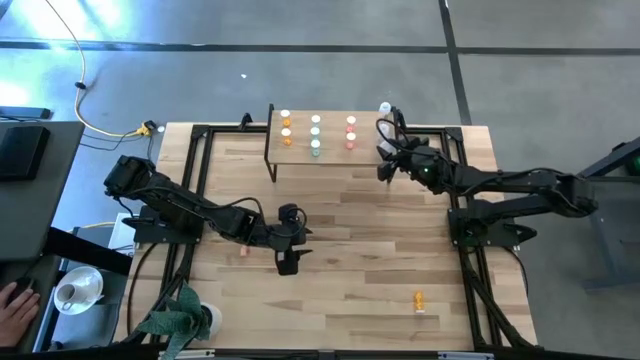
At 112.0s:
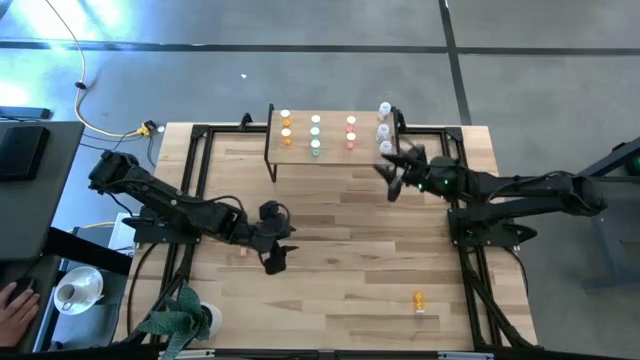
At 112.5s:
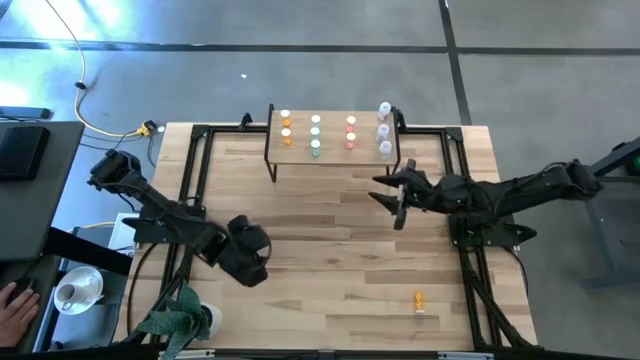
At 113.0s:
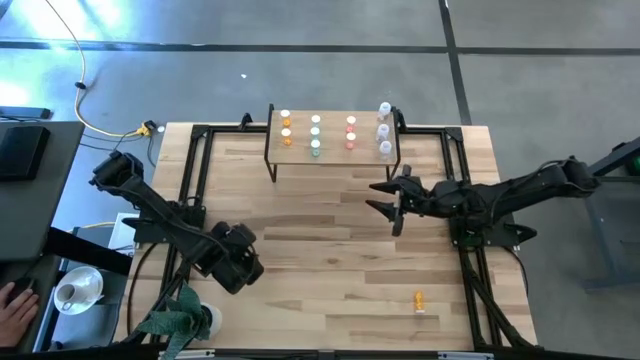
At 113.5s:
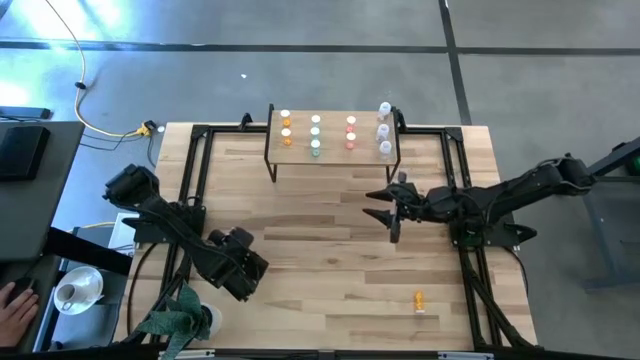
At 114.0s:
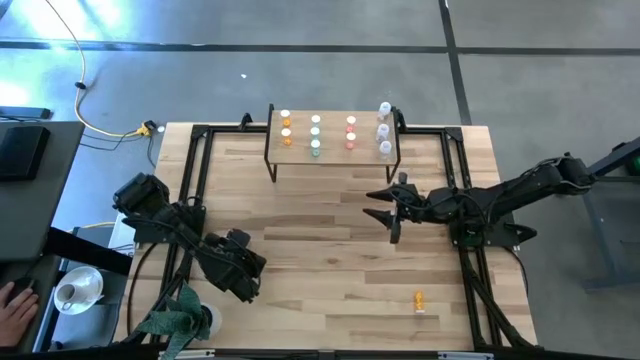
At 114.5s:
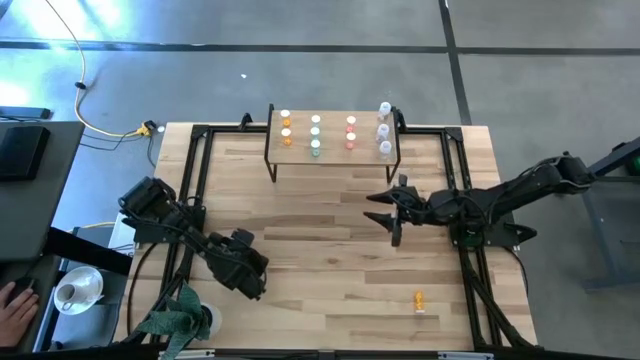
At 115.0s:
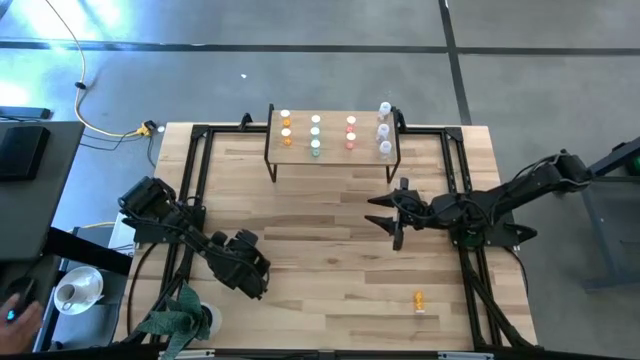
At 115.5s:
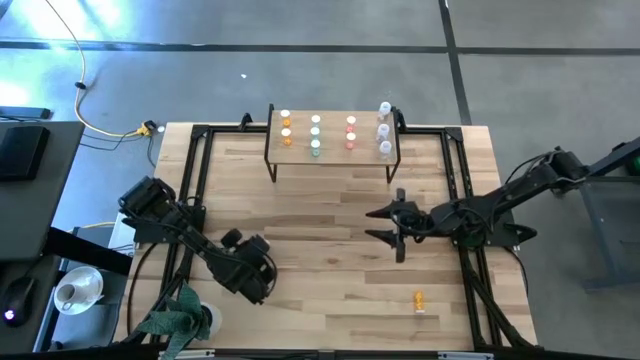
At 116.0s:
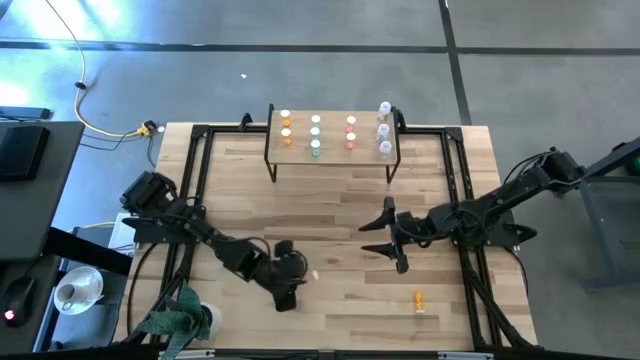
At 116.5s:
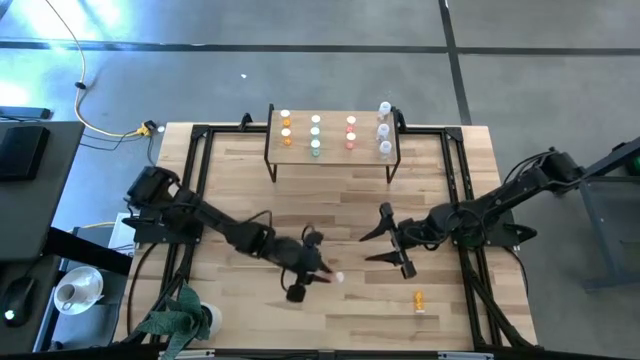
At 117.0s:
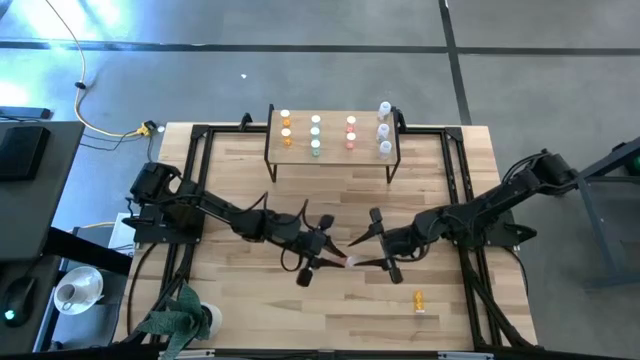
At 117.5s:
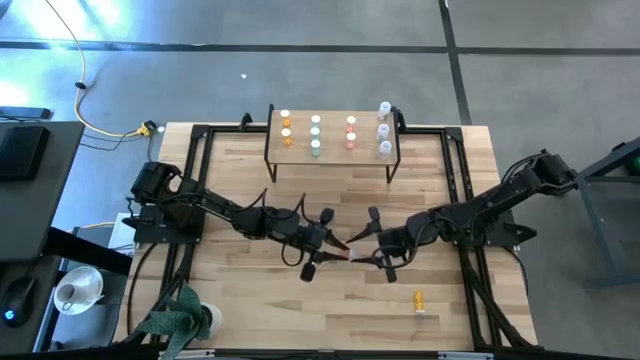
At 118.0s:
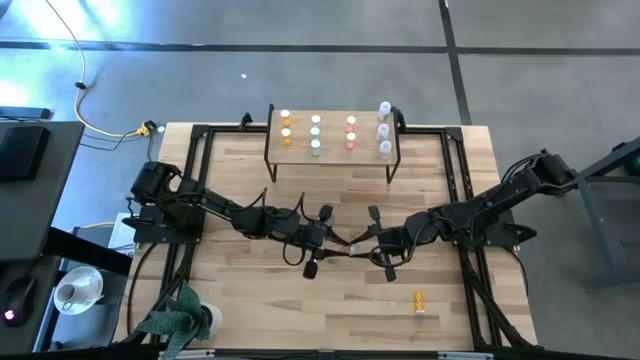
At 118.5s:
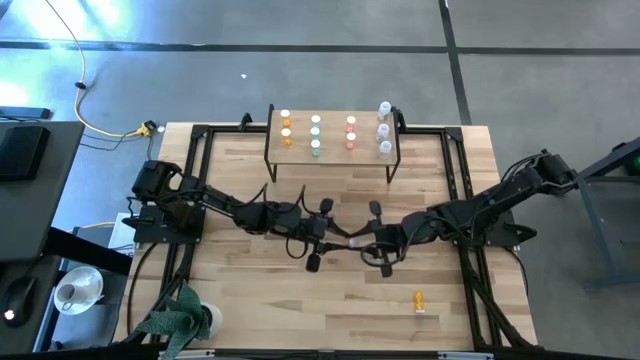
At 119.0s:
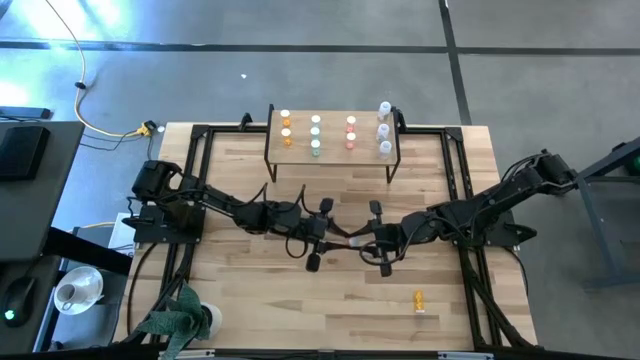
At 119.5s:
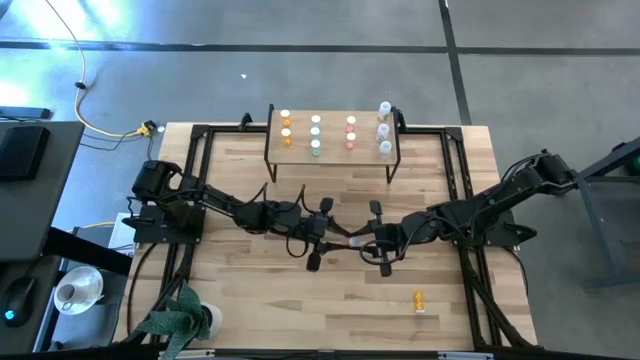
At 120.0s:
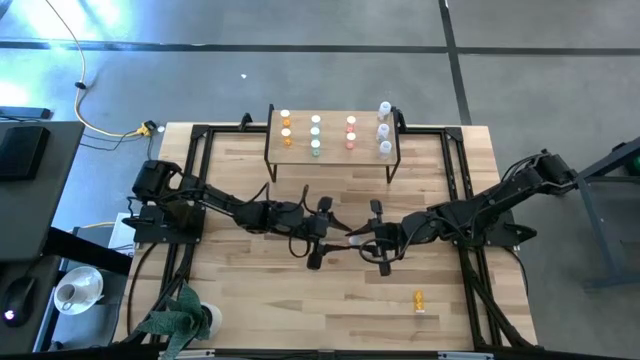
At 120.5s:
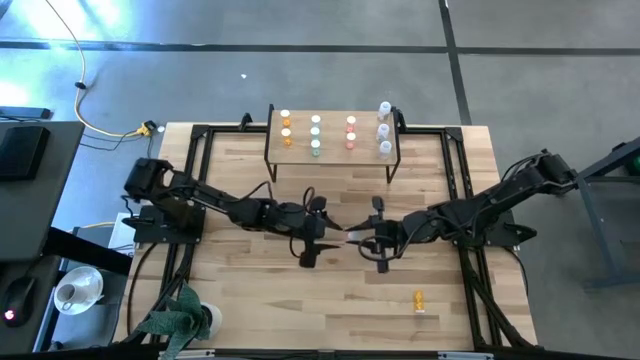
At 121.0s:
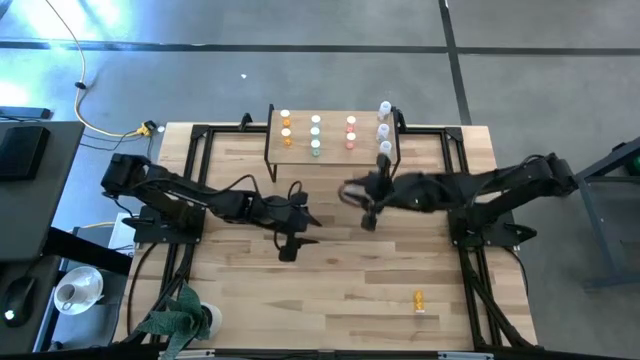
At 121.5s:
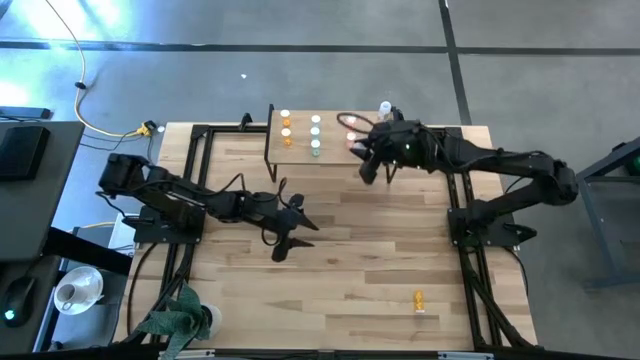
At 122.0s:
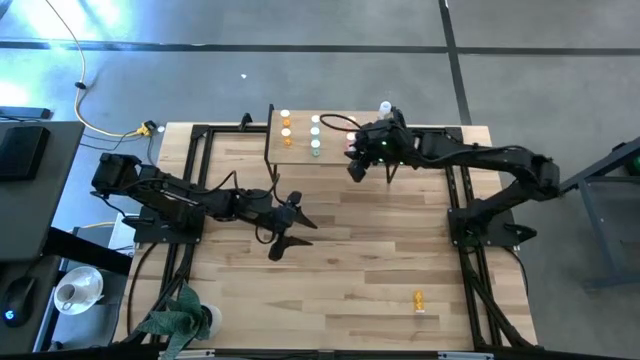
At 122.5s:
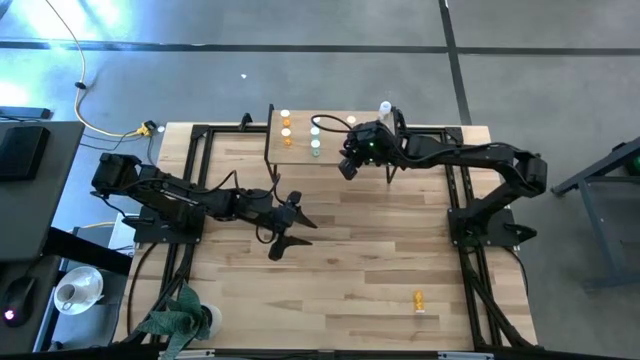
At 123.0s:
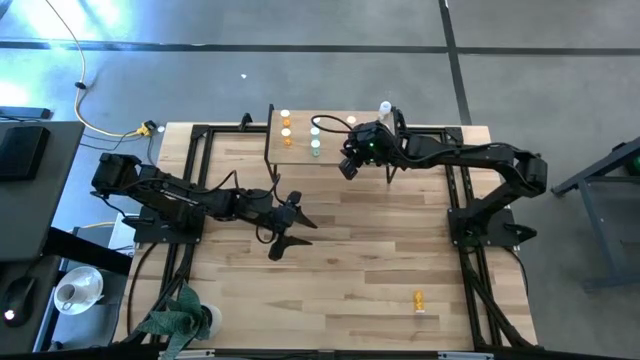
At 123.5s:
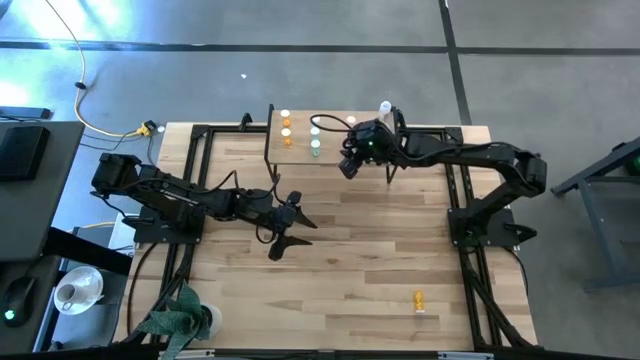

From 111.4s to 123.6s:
Task: Pick and place medicine bottles onto shelf by color
Put the pink pill bottle on the shelf

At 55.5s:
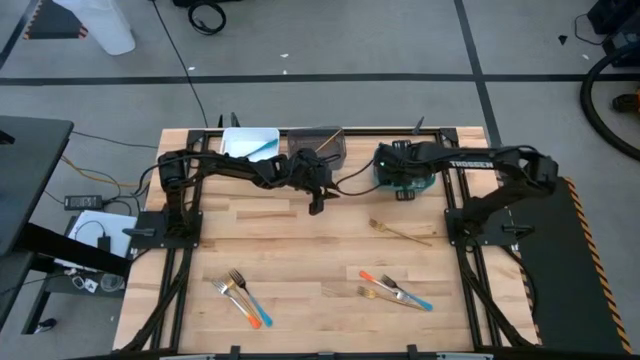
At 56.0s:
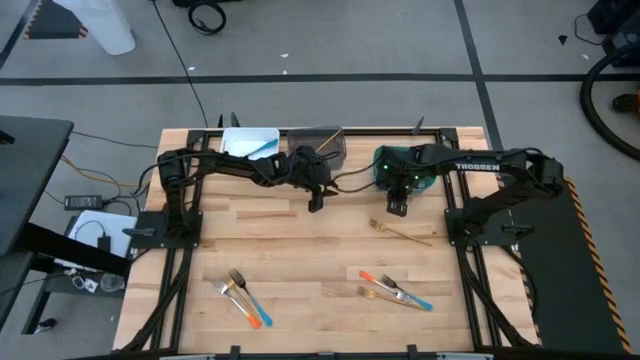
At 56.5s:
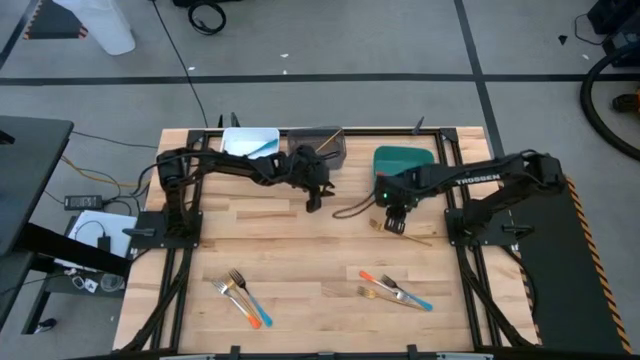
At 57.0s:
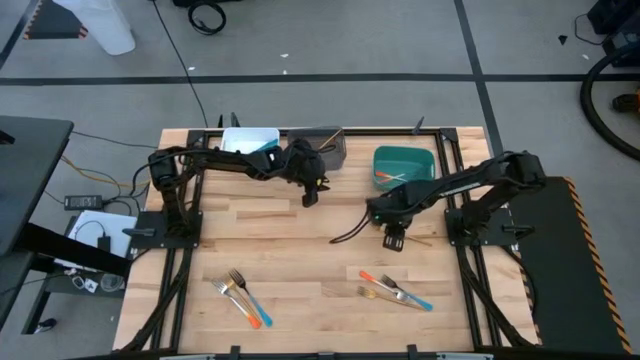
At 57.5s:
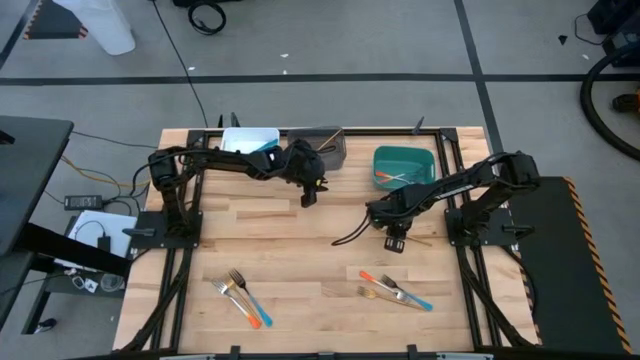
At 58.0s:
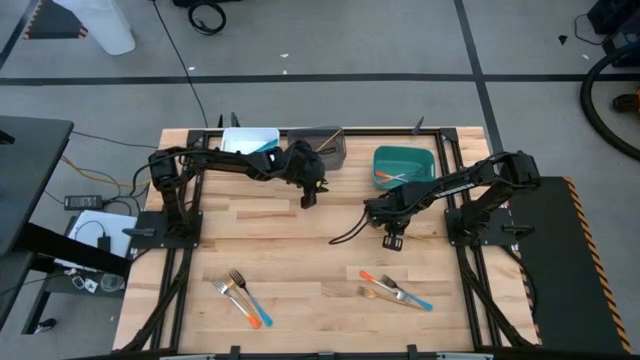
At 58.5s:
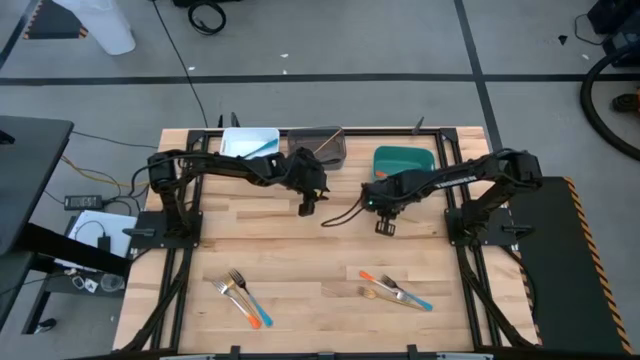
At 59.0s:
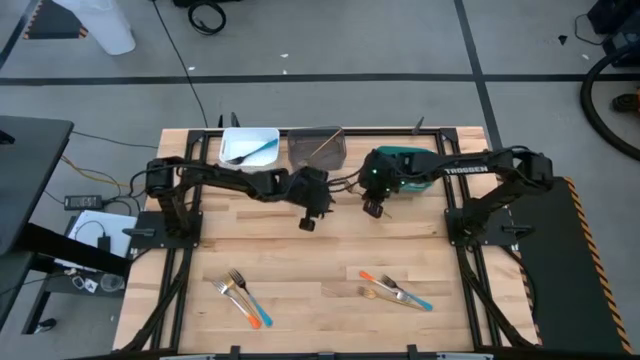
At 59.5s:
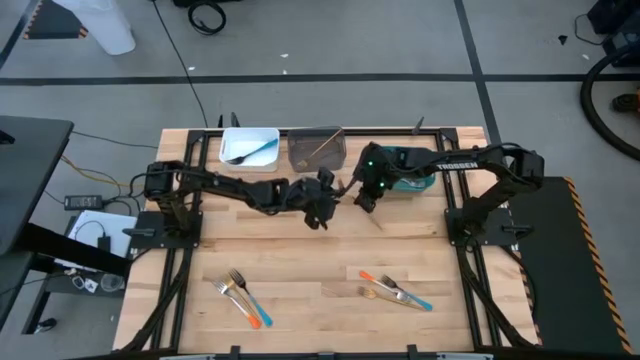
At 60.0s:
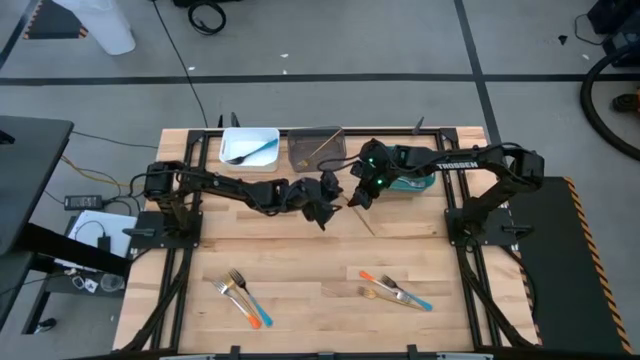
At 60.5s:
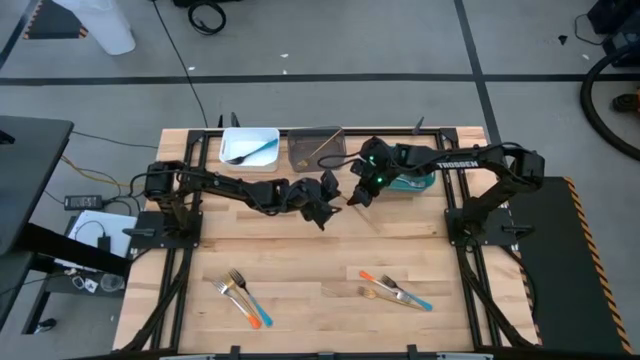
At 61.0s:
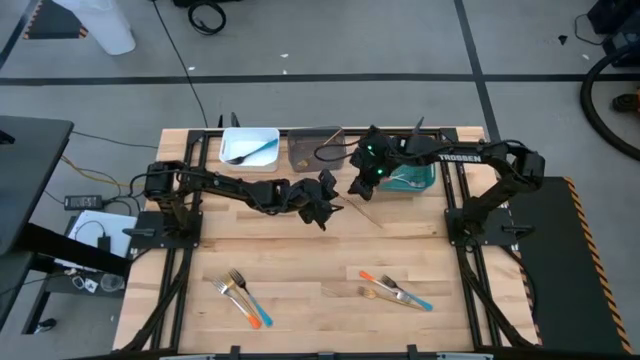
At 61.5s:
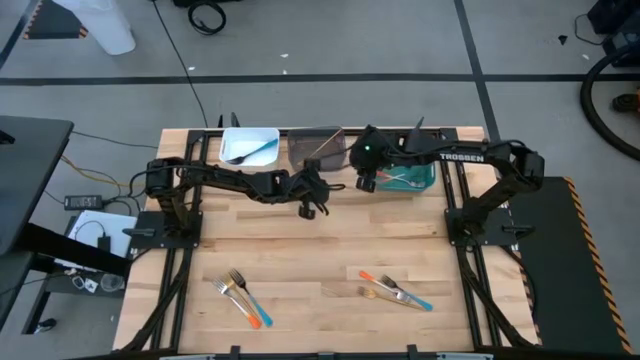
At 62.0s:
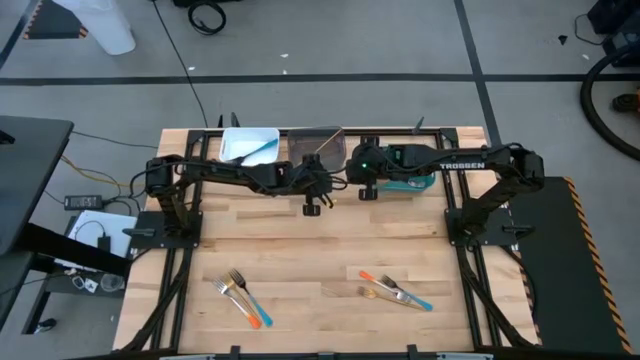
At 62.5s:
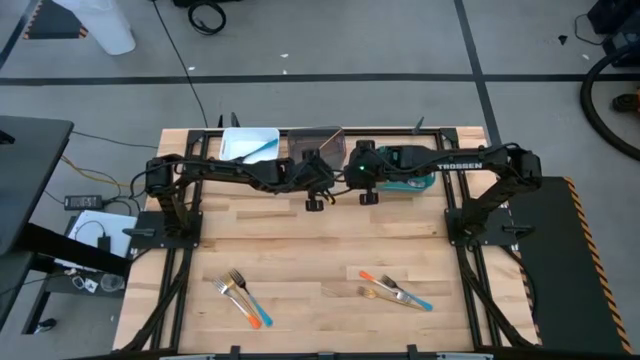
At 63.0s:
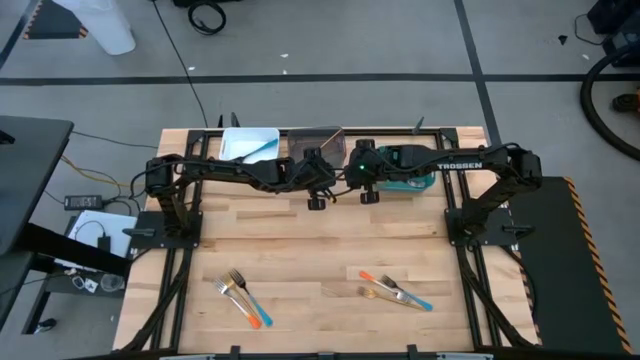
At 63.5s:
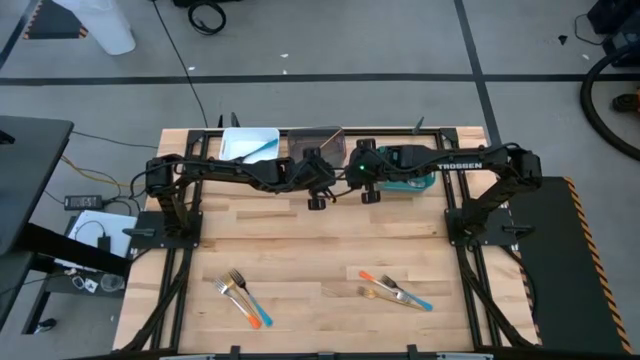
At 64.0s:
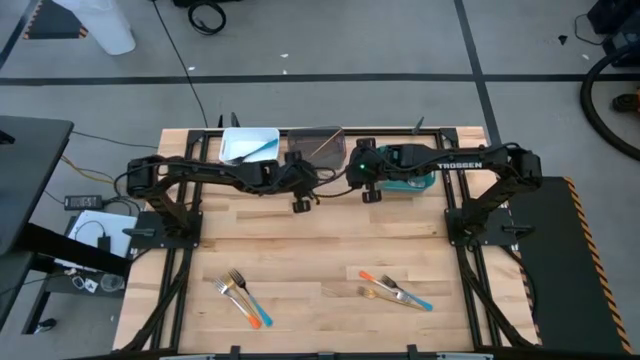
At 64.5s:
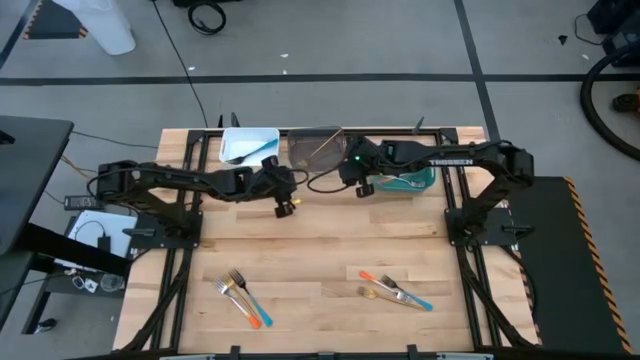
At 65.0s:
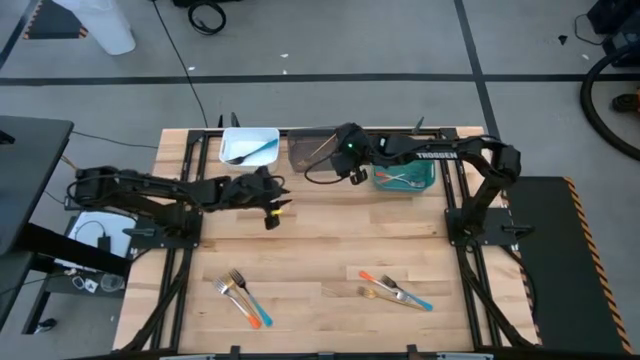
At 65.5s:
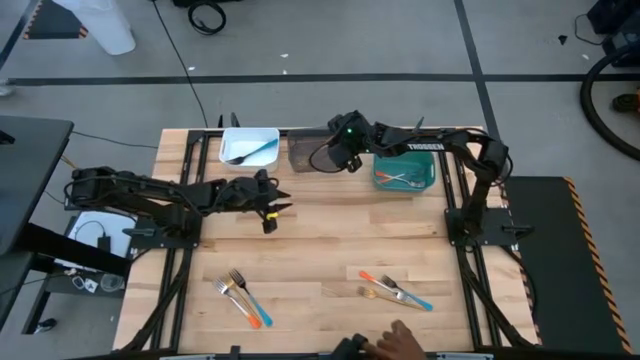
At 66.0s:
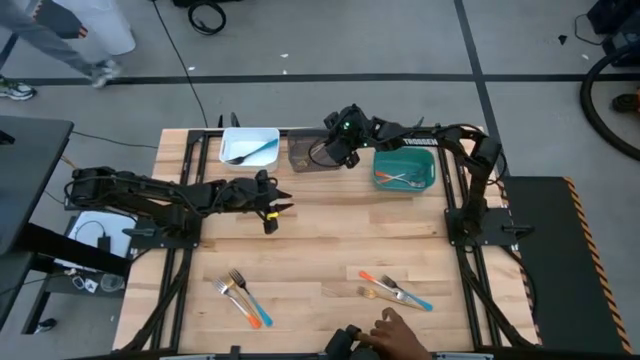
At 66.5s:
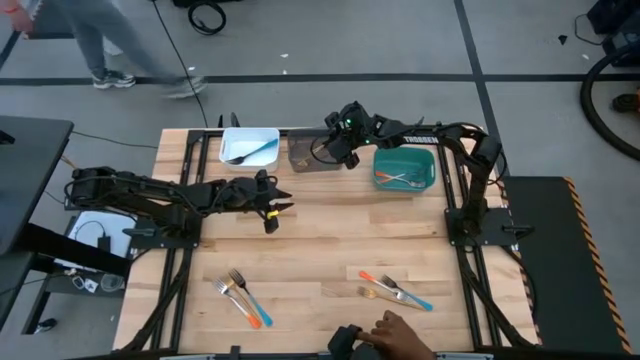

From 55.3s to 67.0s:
Task: Sort silverware by color (type)
Put the gold fork into the black bin
